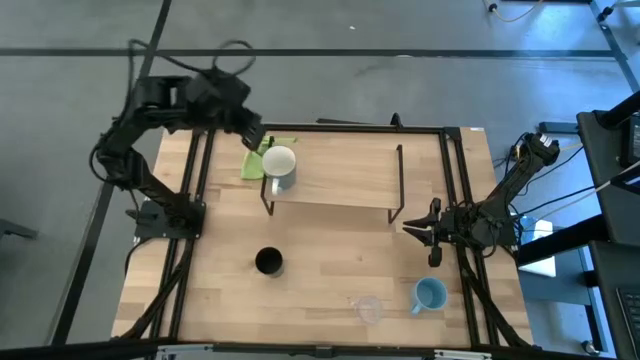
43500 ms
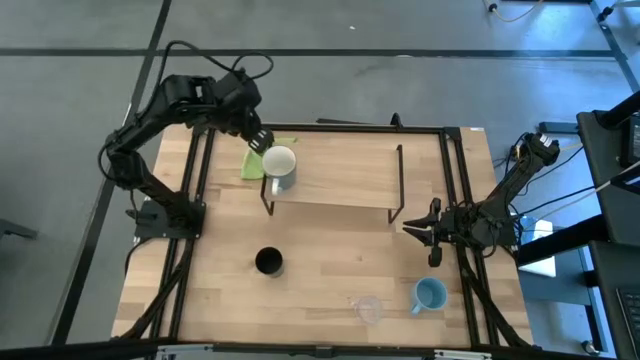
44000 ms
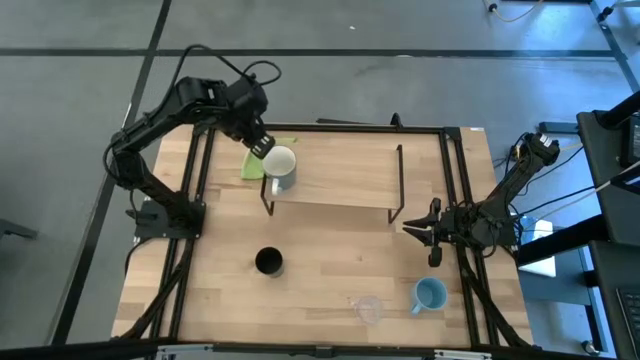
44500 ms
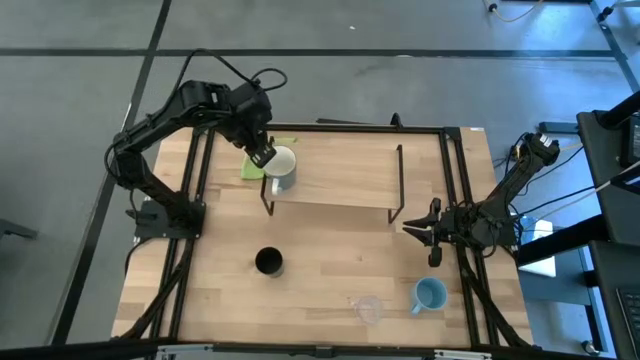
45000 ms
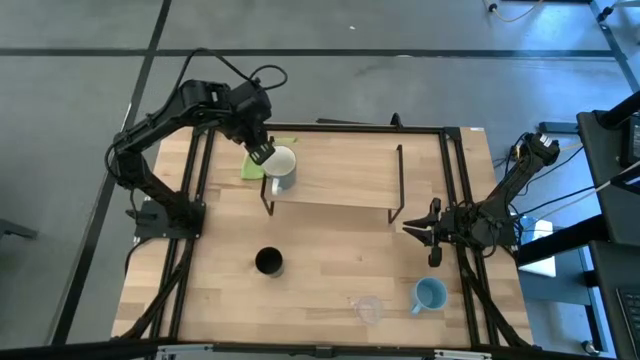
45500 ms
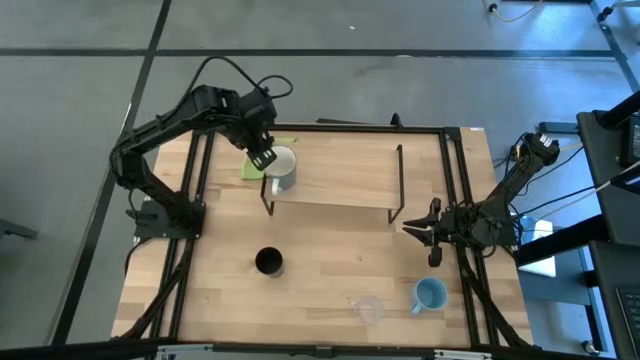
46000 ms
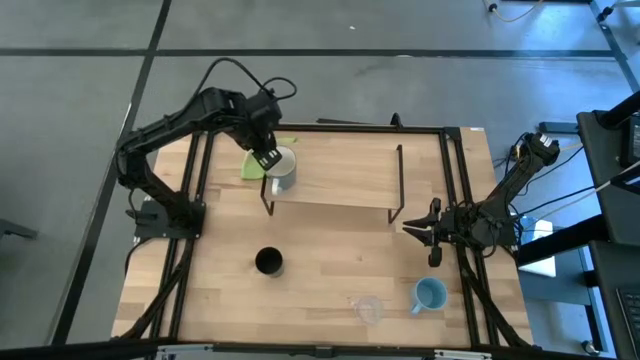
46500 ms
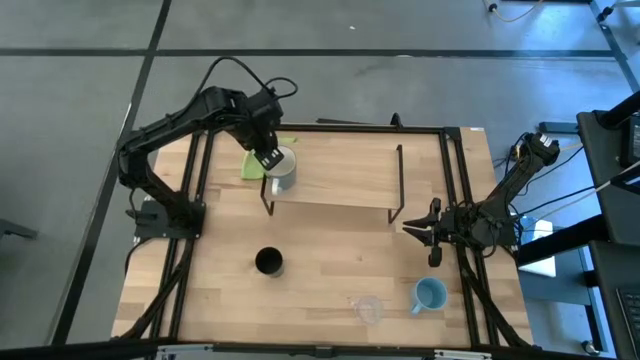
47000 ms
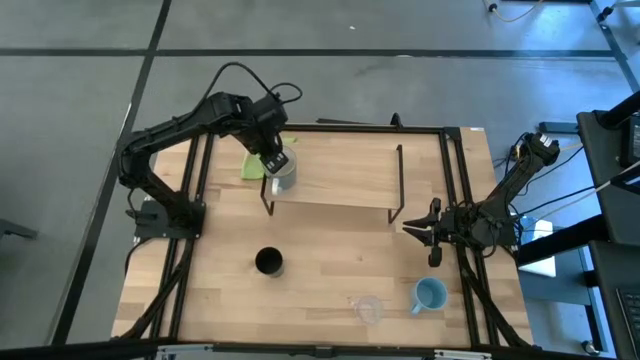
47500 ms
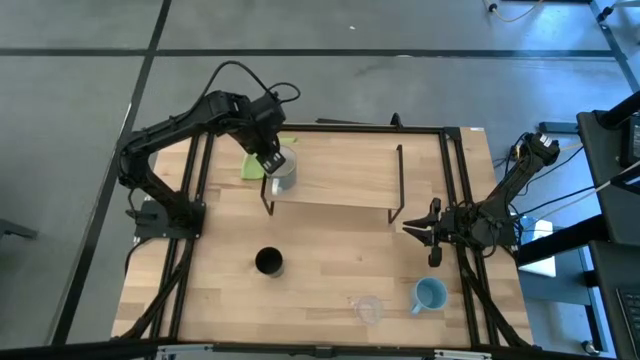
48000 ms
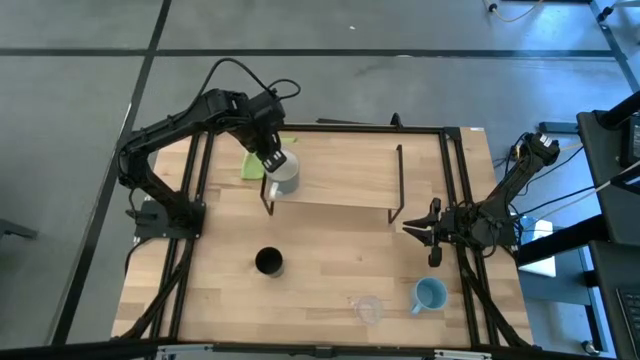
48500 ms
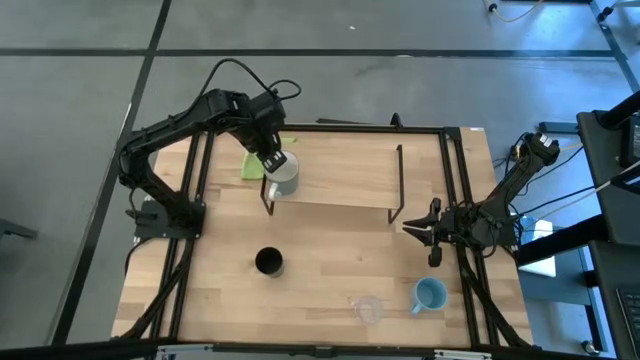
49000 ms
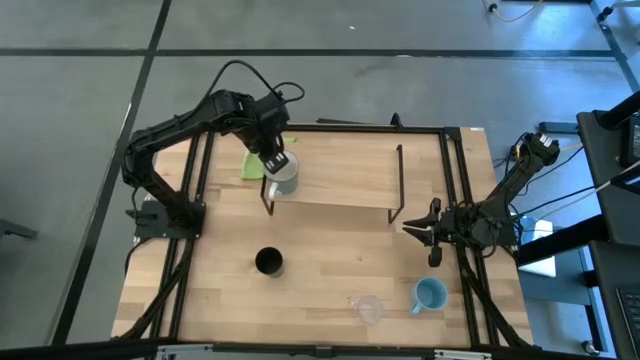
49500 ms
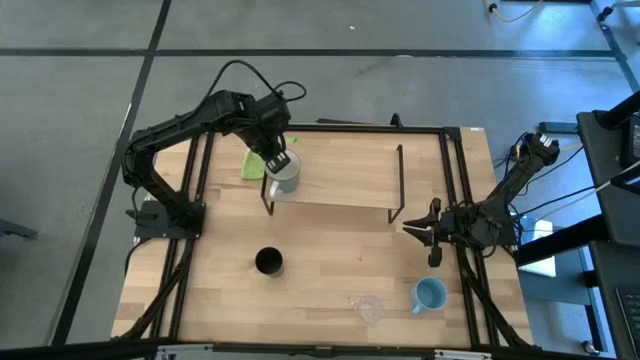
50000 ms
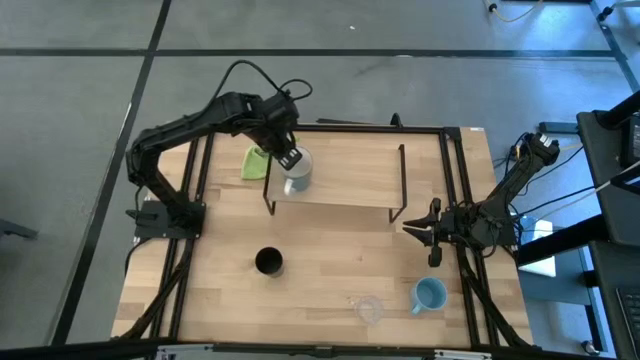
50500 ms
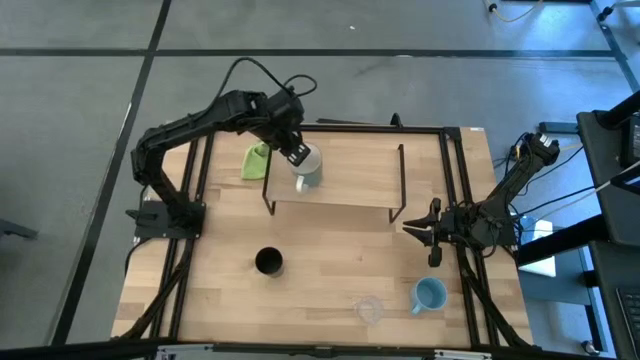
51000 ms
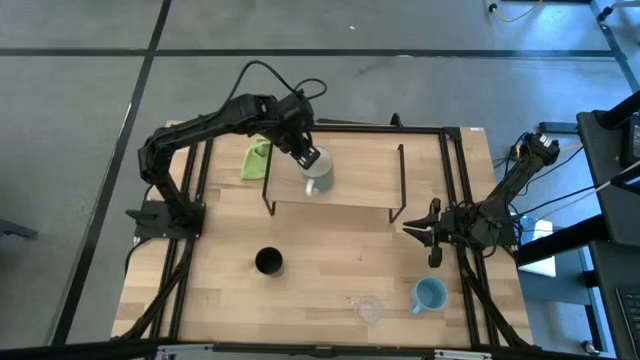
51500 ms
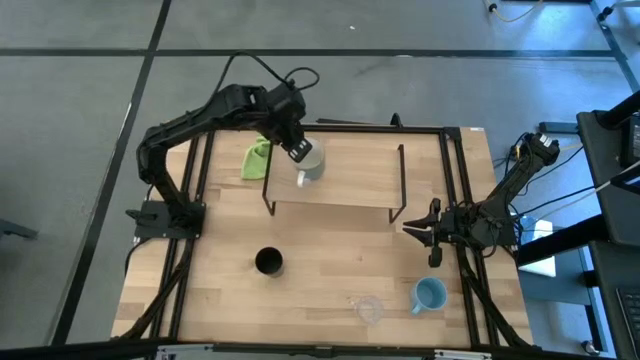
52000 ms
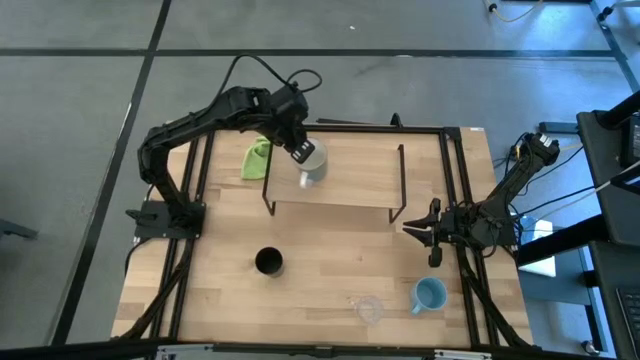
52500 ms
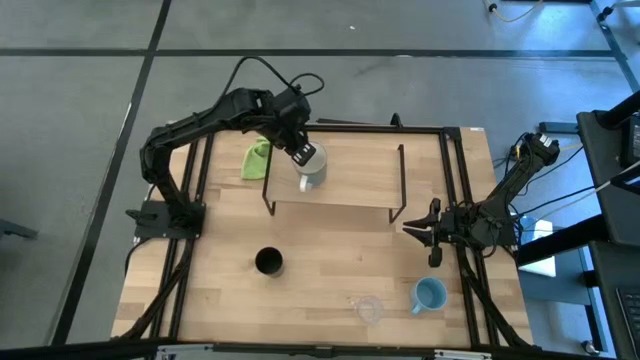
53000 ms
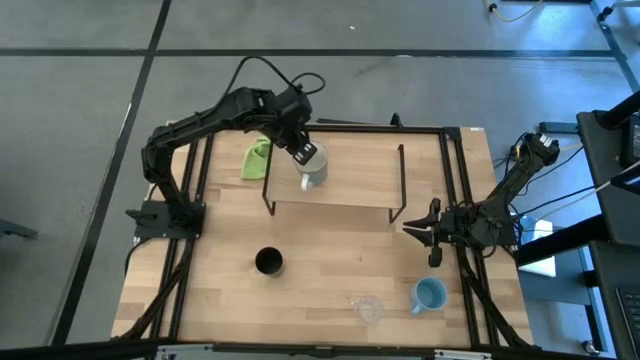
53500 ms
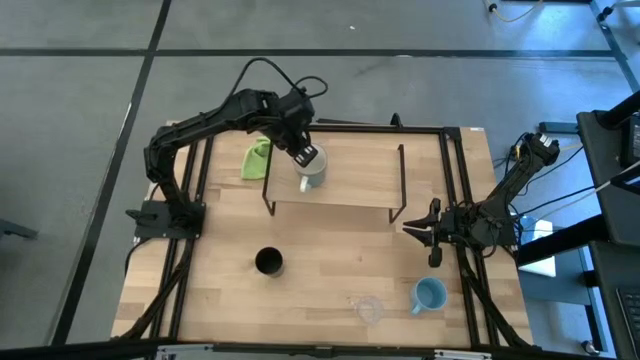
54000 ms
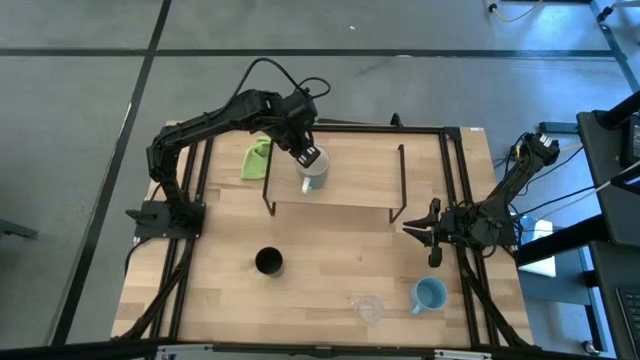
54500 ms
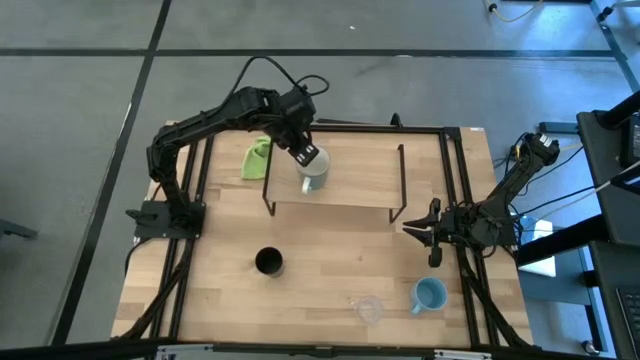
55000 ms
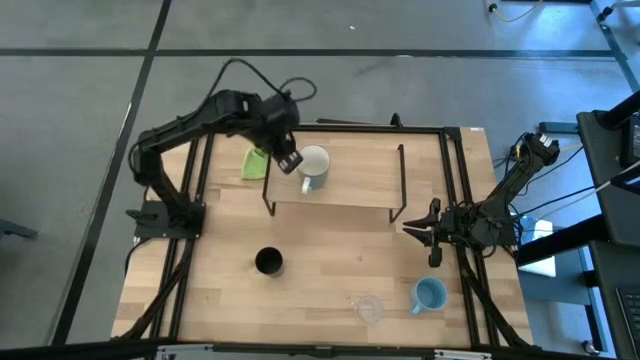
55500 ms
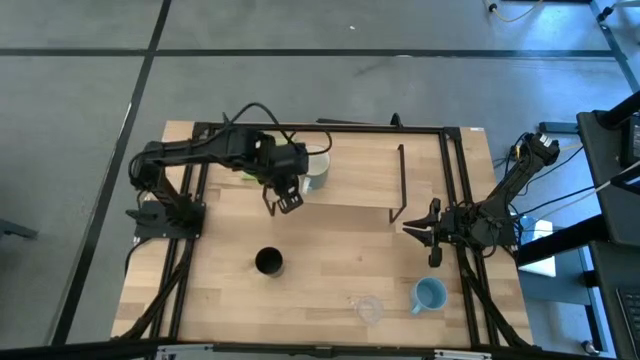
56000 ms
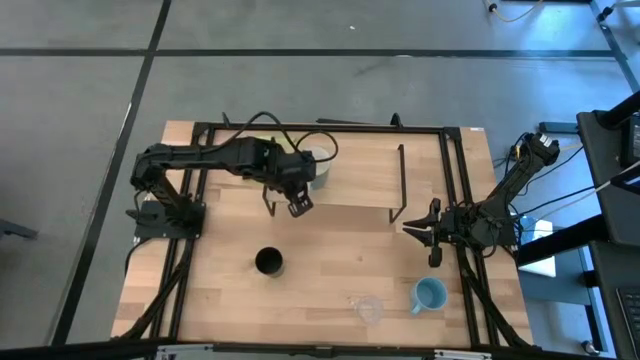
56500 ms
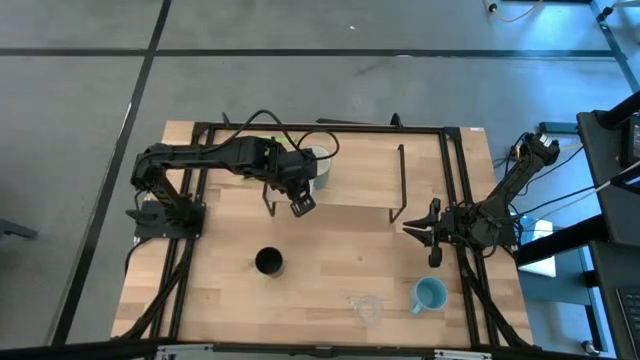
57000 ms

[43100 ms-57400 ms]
Task: Stack small to large cups/mugs on shelf
Adjust the blue mug

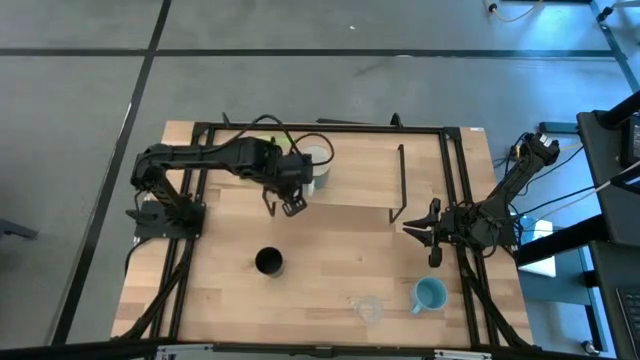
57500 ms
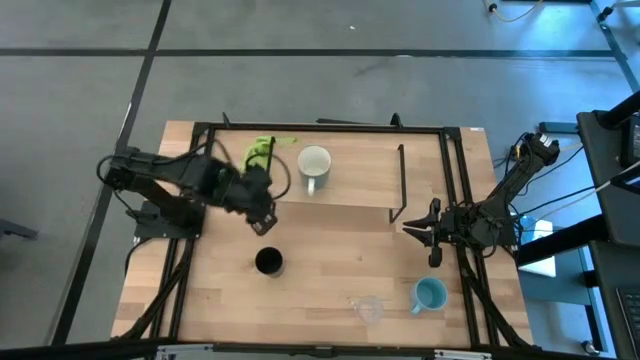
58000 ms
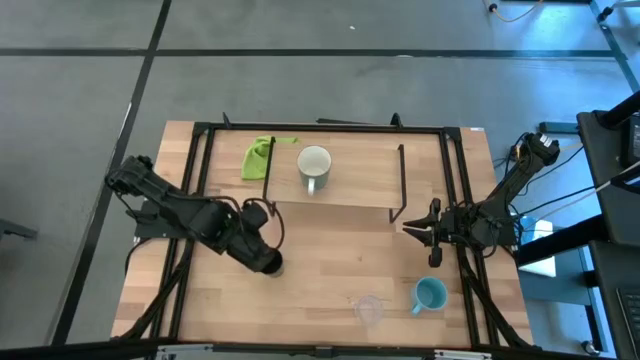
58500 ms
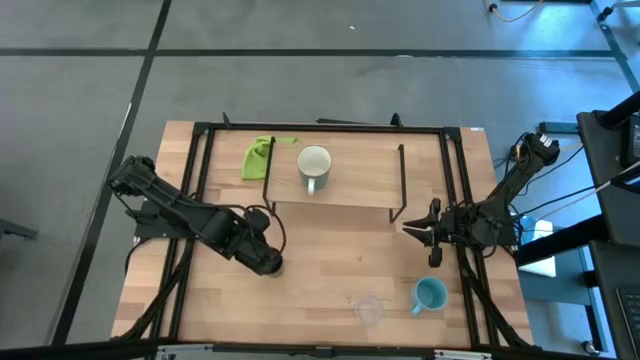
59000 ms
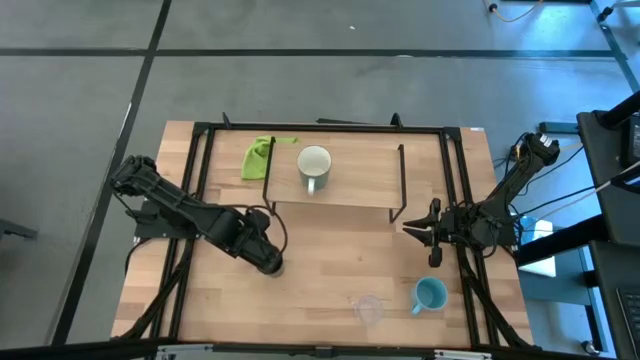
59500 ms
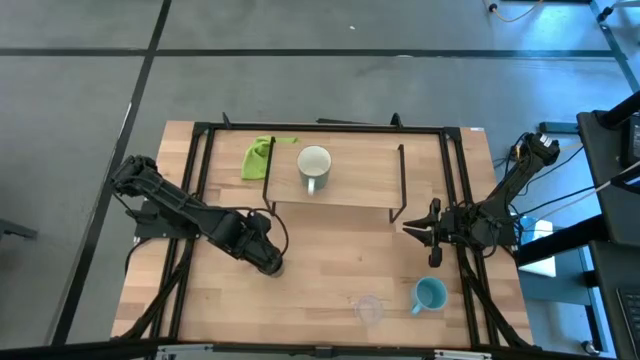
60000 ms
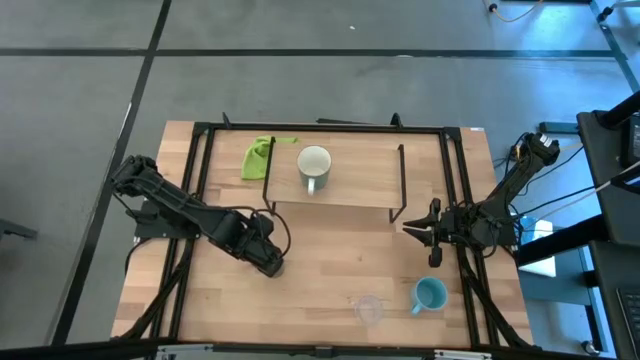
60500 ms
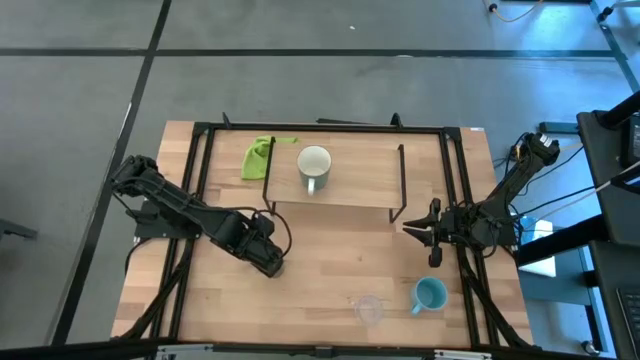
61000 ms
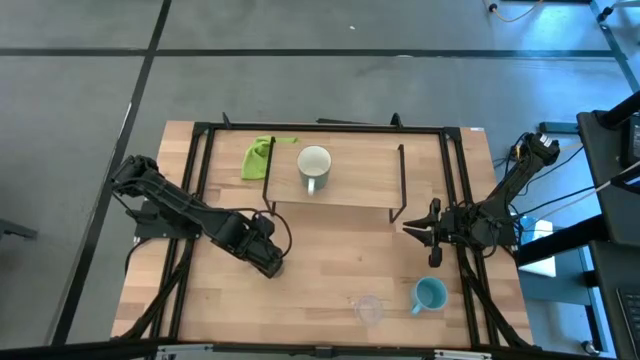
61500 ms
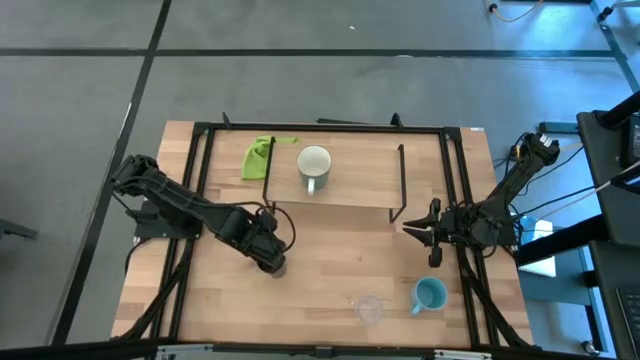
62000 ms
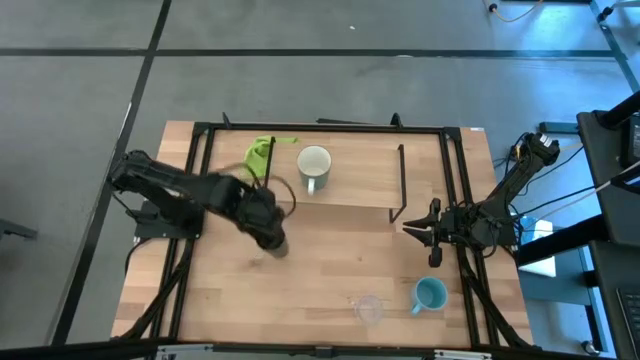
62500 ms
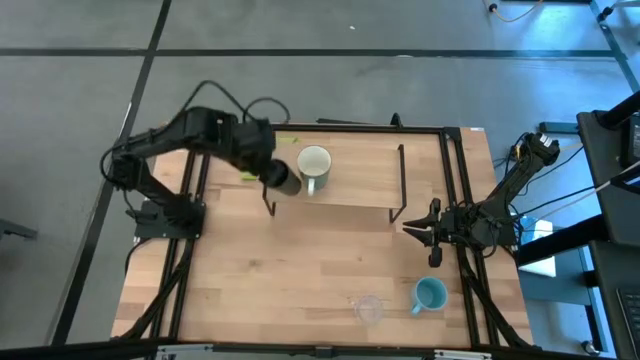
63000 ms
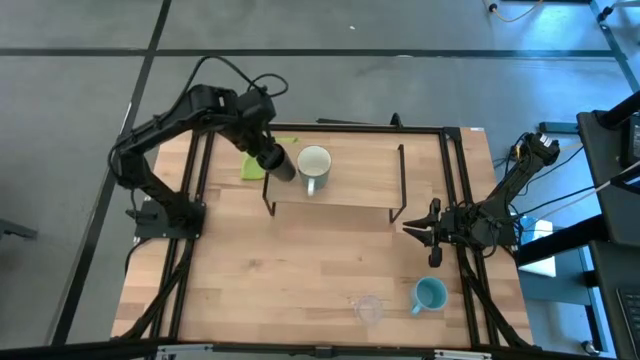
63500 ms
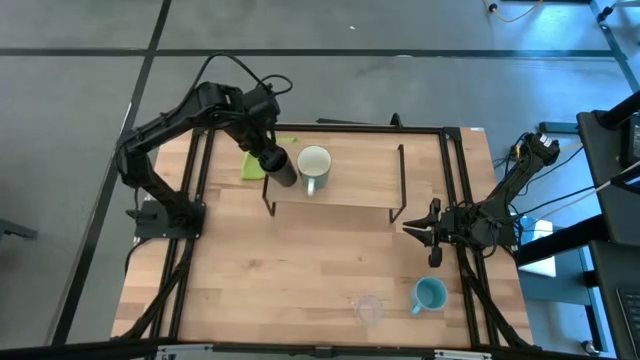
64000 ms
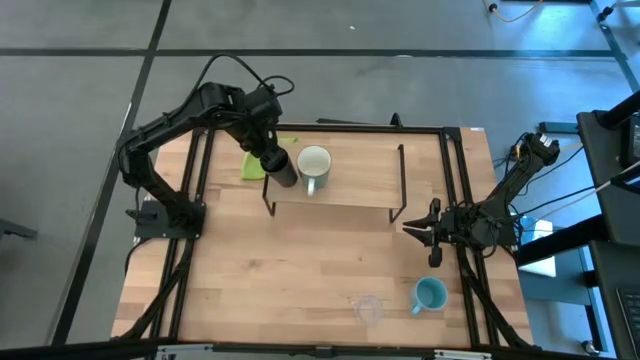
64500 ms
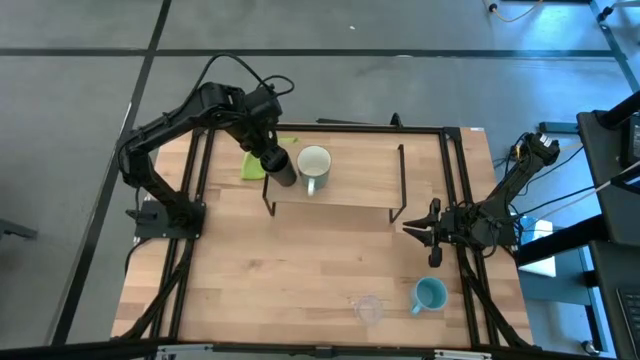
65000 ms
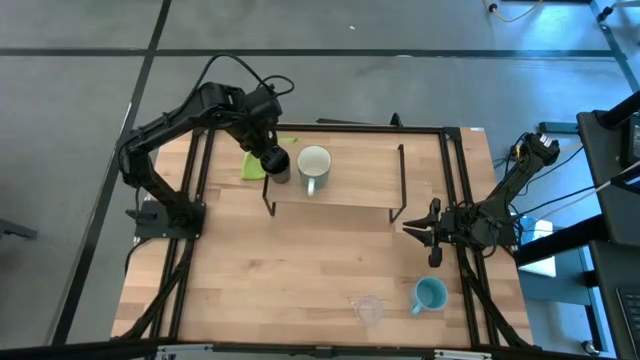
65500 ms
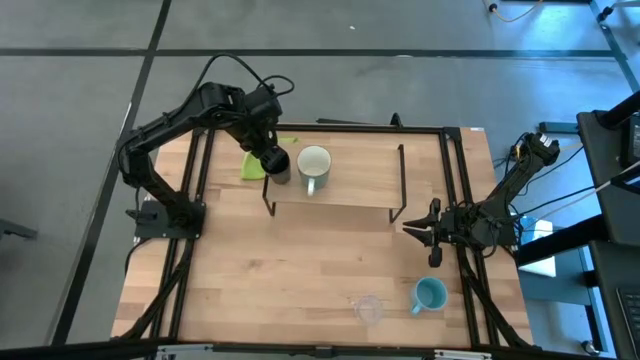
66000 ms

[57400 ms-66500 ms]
Put the black cup on the shelf
